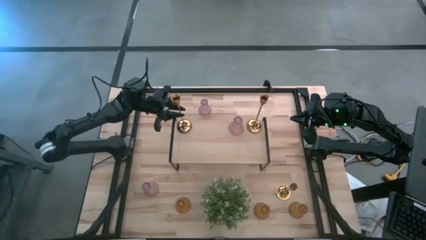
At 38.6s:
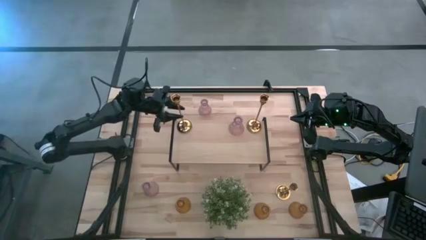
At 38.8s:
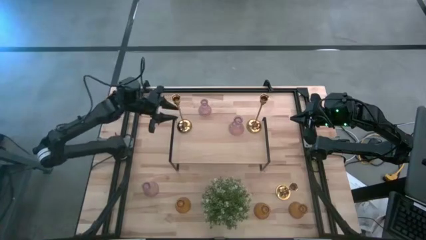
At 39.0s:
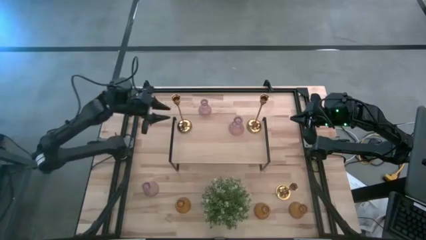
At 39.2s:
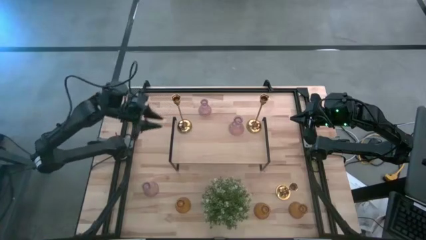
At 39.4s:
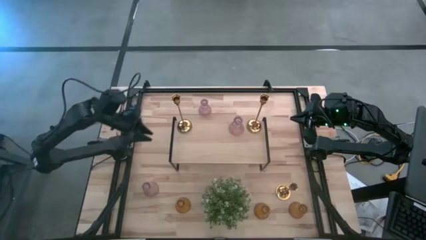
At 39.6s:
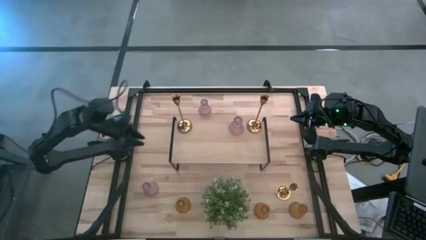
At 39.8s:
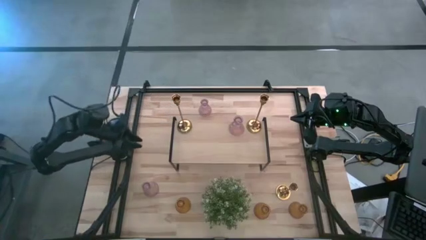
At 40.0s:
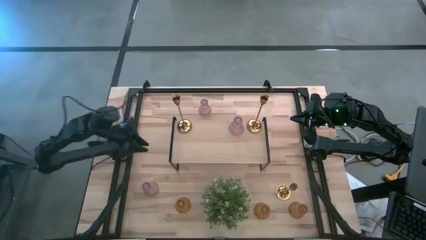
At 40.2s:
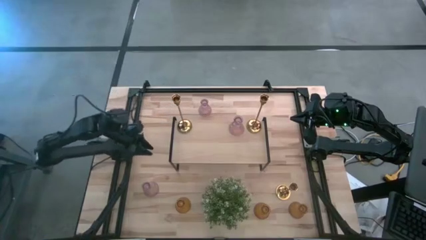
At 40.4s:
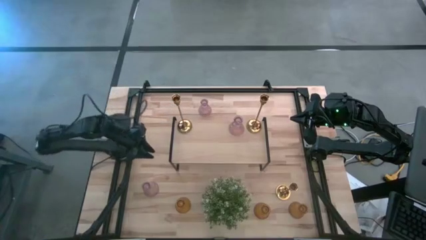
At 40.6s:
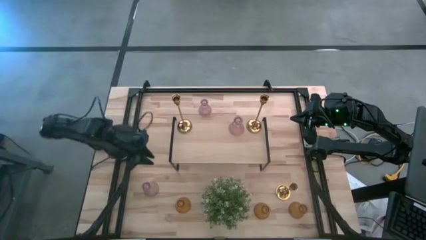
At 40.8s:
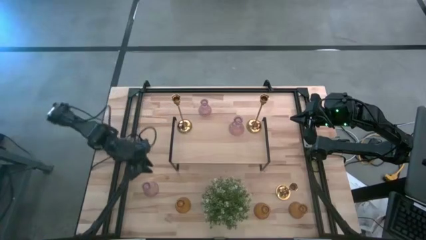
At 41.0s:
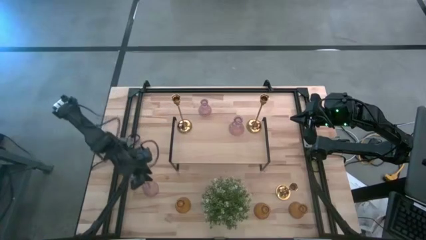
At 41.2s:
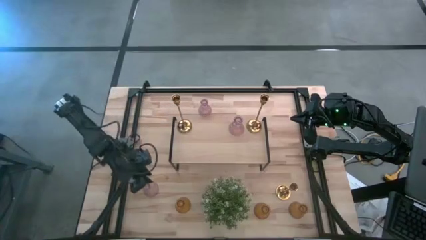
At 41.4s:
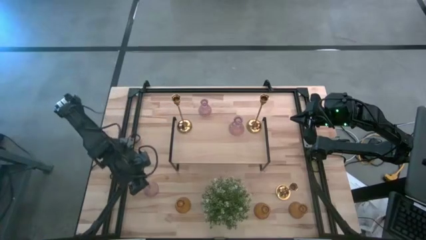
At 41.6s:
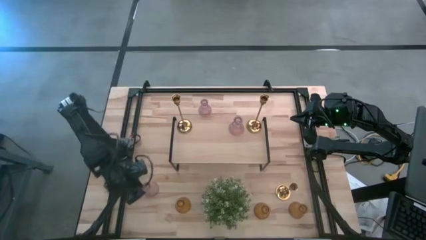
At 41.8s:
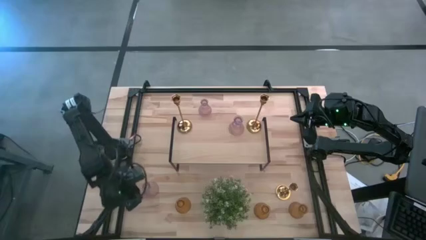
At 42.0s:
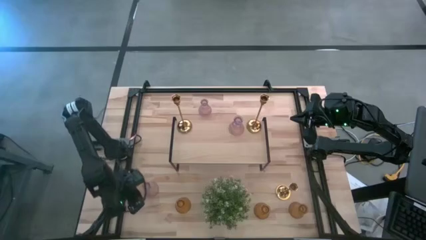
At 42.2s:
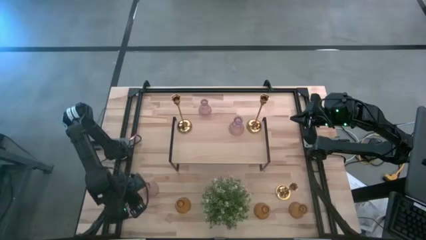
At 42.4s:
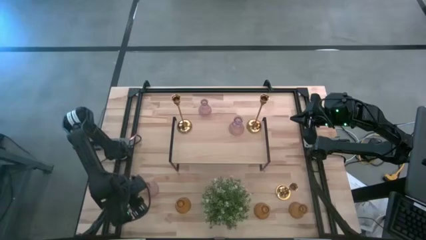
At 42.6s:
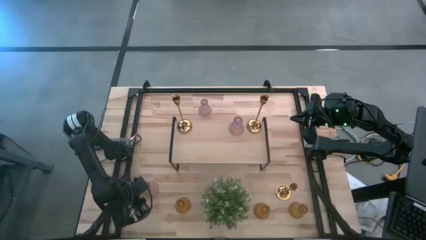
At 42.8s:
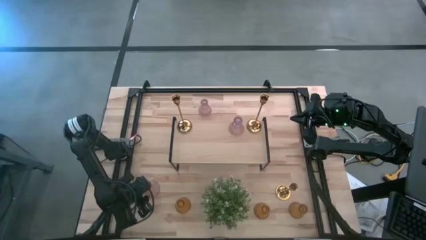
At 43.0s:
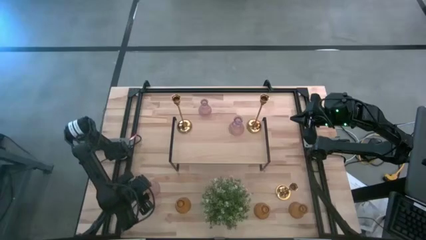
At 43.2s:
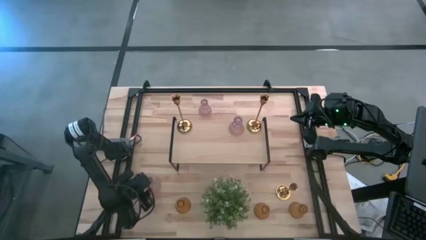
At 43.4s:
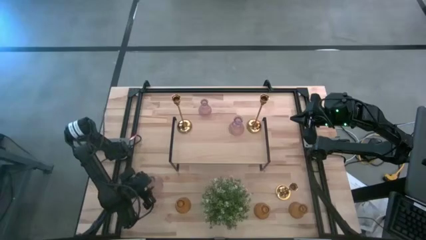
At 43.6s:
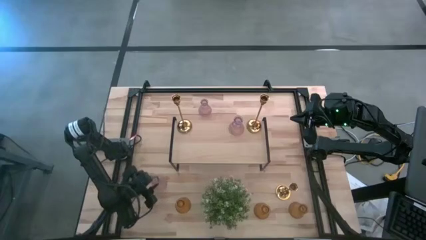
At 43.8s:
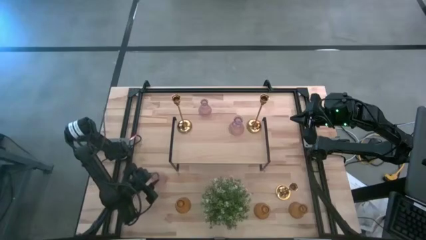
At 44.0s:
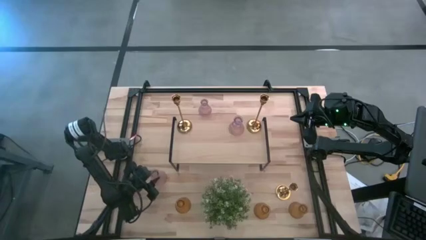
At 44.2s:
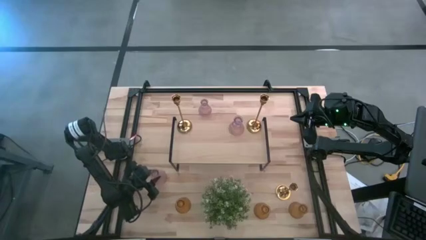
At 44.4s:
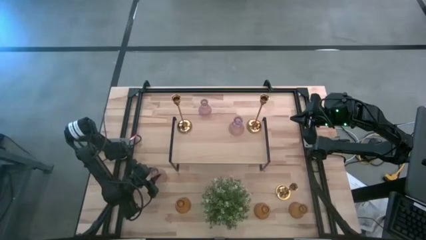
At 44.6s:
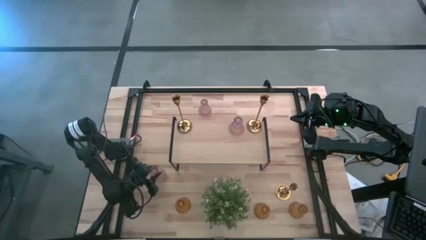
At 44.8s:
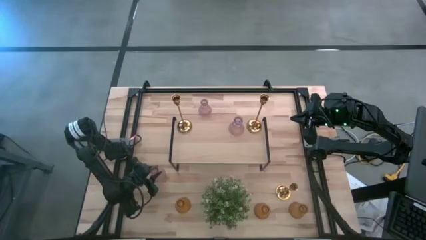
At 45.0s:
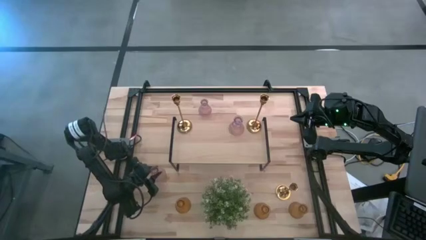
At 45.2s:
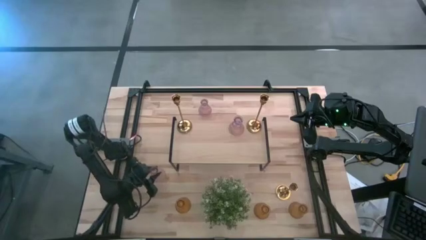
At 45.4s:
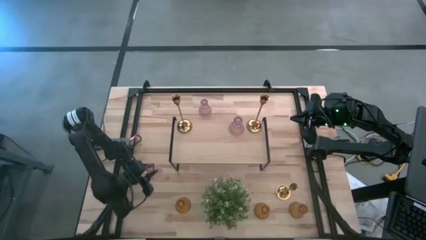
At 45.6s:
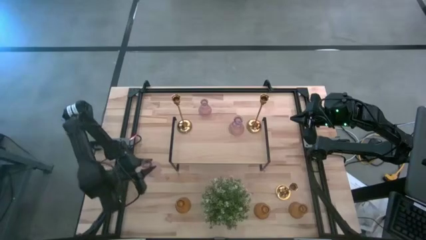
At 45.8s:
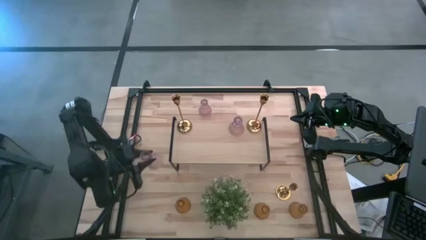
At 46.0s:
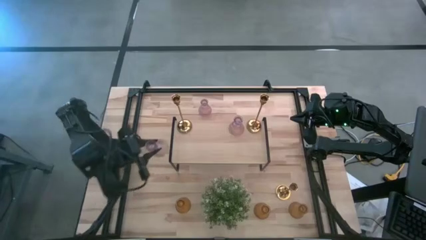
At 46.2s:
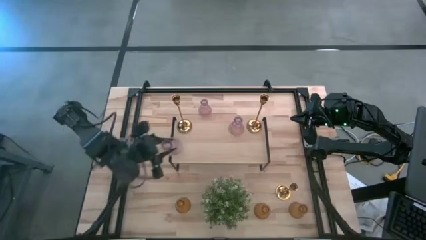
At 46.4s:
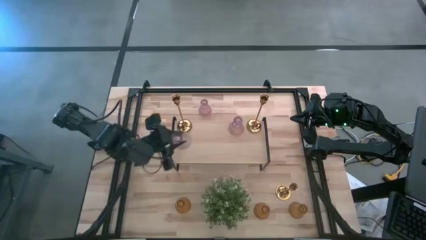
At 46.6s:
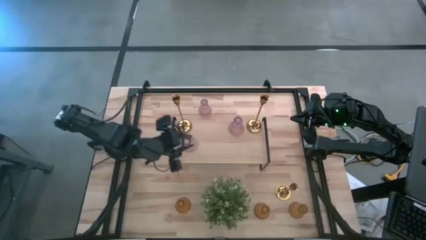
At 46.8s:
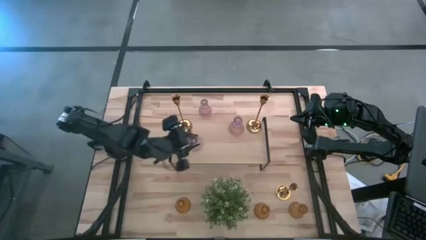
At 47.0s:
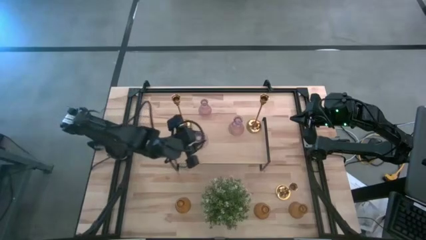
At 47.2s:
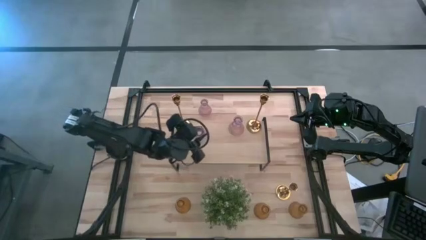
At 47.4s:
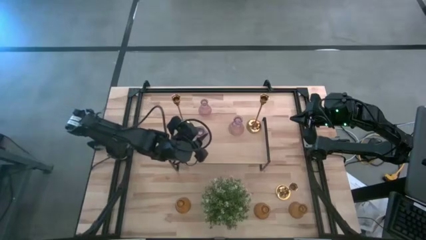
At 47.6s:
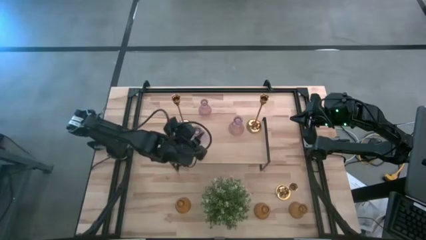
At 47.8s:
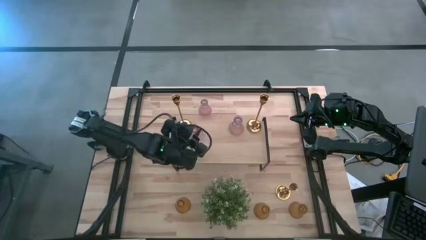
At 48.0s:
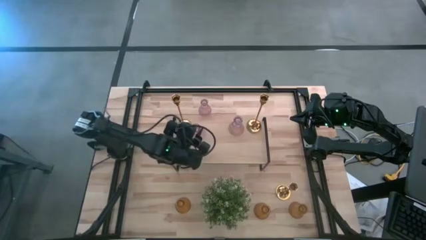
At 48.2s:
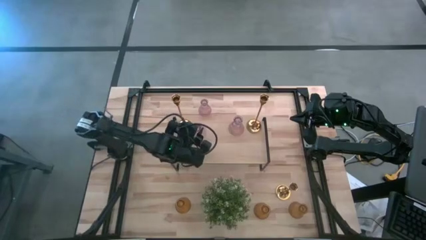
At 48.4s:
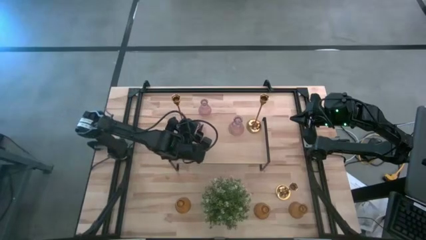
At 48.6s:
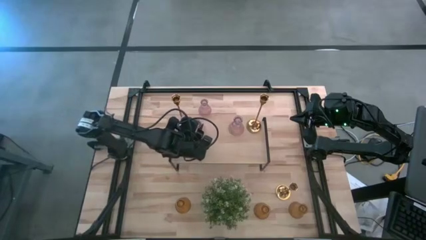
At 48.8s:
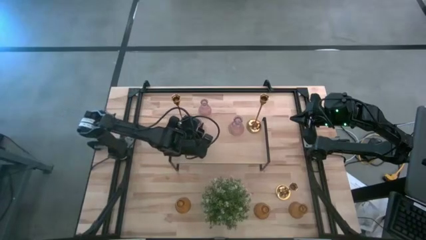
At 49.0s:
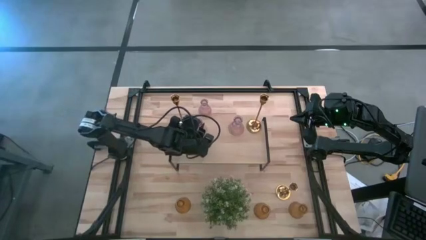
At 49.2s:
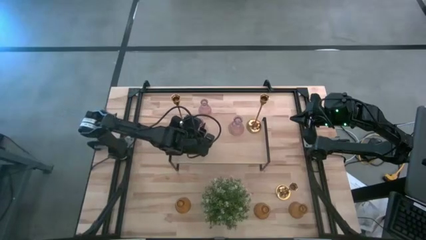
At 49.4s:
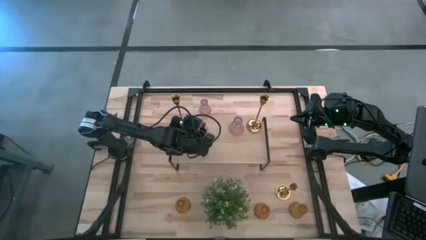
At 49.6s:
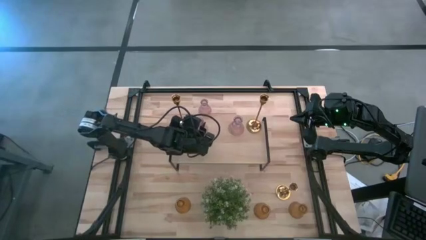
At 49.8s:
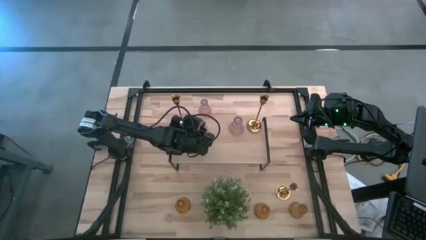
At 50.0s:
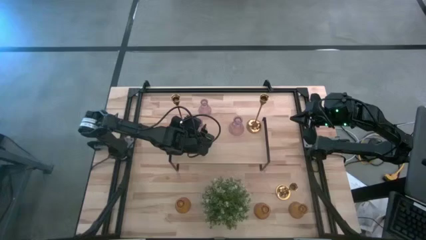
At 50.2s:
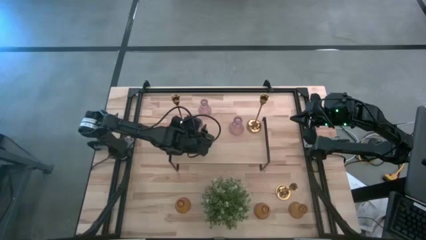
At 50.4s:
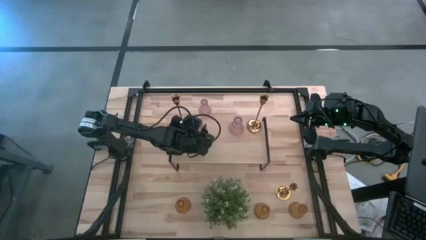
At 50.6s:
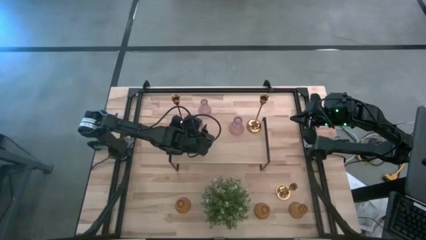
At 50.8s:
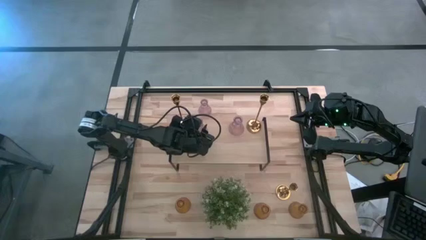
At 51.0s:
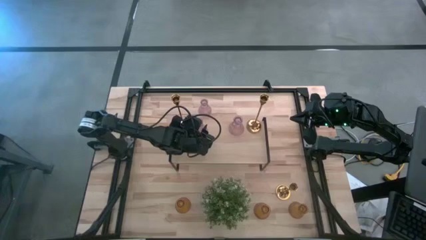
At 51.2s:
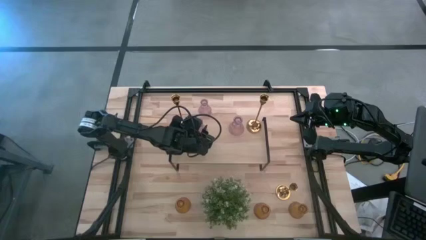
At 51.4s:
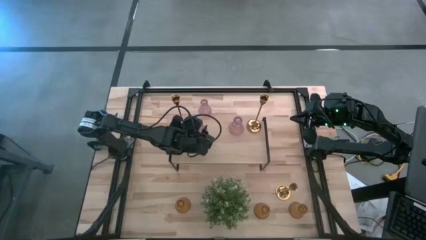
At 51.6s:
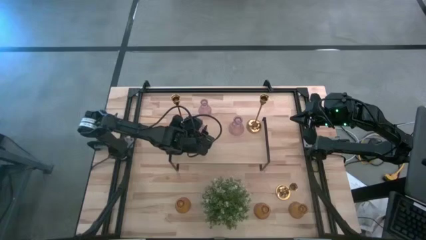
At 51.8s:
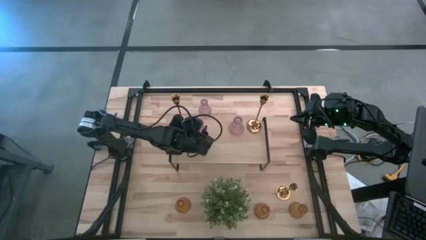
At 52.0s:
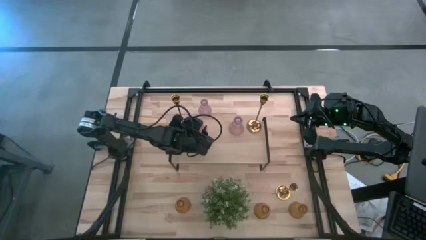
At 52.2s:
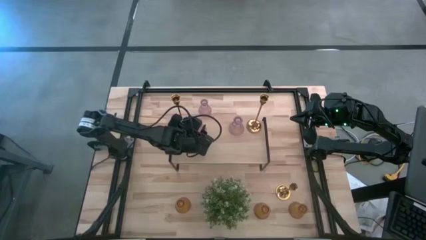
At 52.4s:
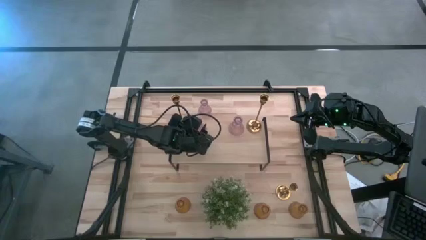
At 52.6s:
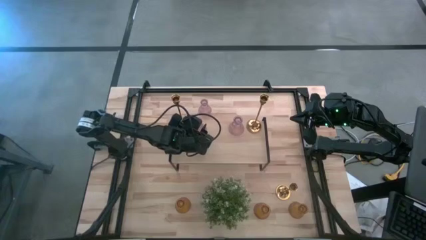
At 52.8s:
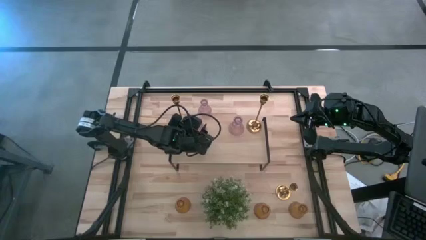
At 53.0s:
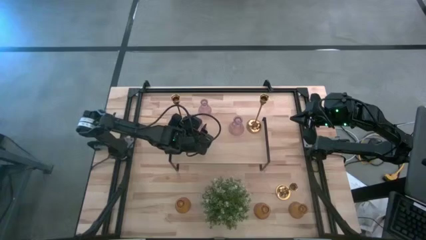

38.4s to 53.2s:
Task: Pick & Place candle stick holders
Put the bottom pink vase on the shelf

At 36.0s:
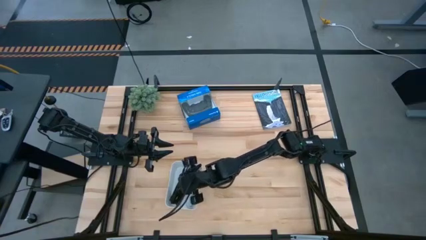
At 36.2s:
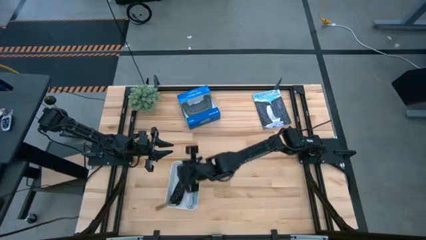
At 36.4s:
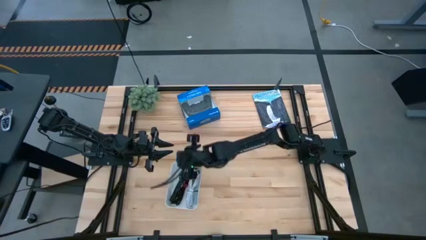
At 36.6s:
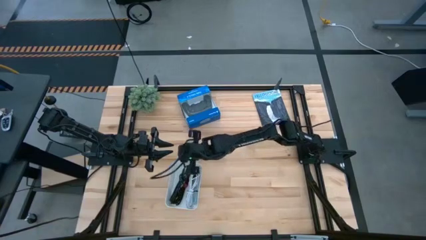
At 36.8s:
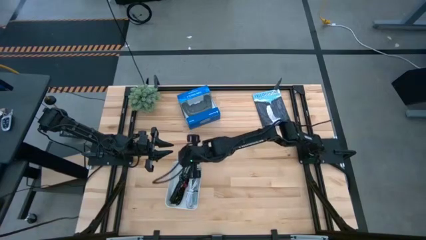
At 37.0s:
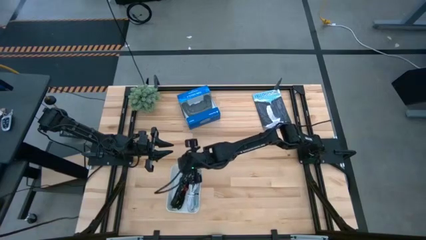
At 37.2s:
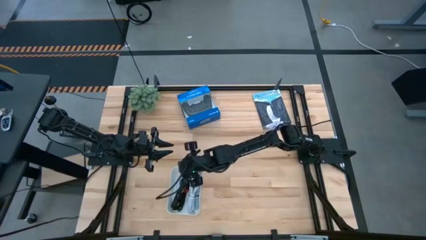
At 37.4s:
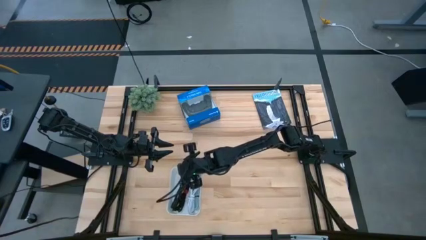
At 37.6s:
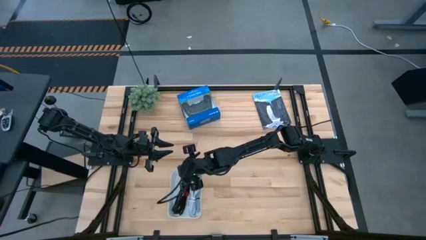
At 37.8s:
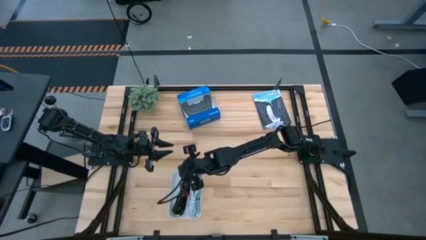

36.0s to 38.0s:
Task: Pick and place USB-C Cables
Adjust the white bin
